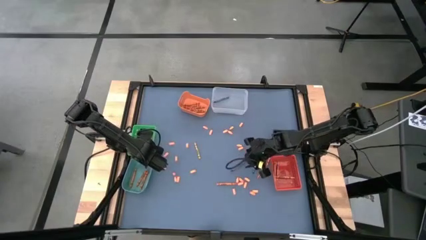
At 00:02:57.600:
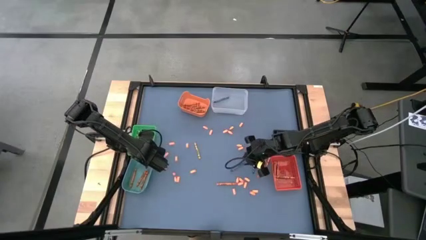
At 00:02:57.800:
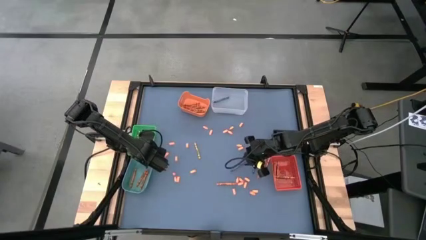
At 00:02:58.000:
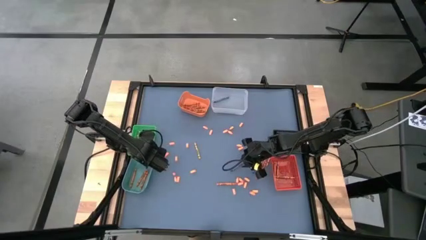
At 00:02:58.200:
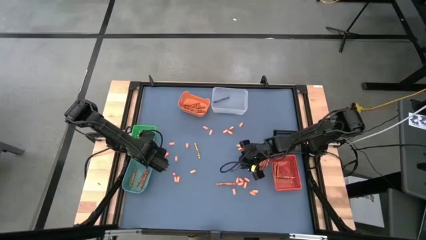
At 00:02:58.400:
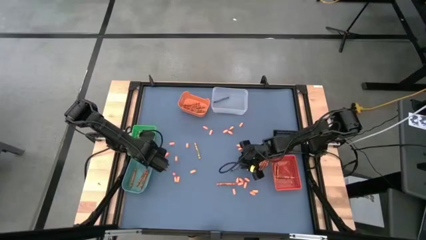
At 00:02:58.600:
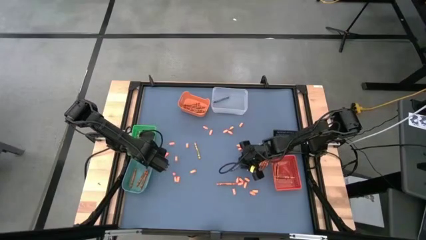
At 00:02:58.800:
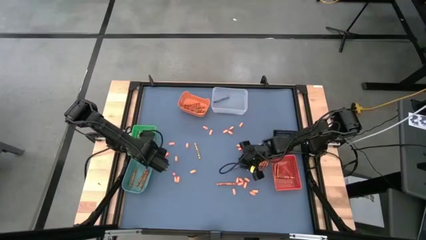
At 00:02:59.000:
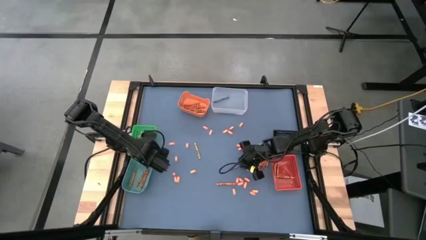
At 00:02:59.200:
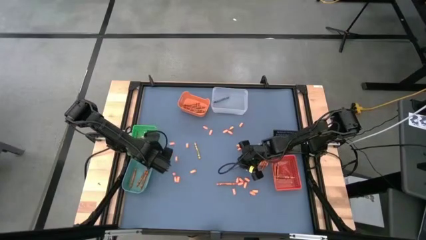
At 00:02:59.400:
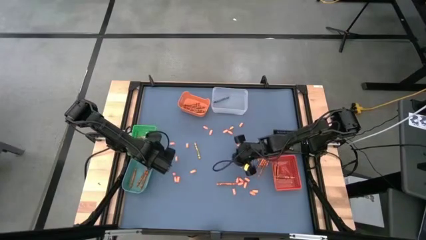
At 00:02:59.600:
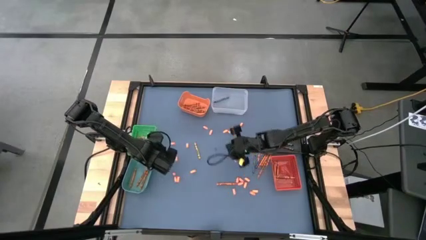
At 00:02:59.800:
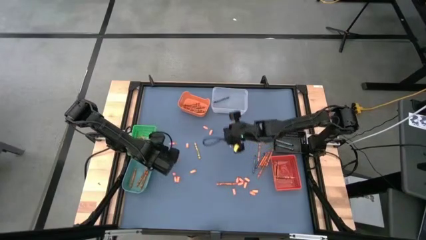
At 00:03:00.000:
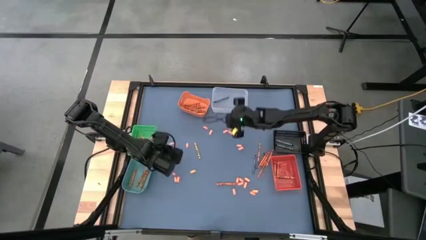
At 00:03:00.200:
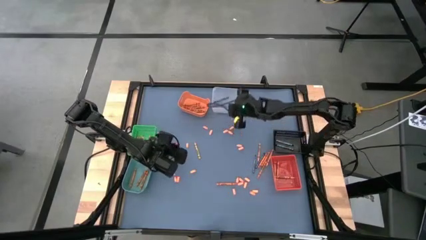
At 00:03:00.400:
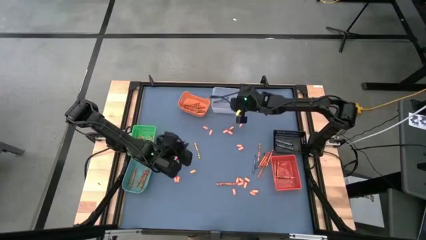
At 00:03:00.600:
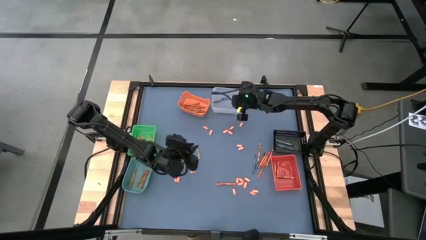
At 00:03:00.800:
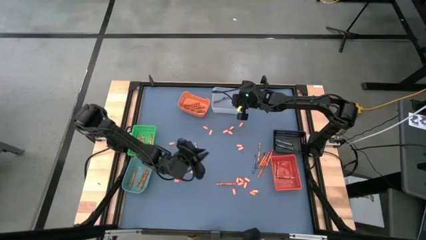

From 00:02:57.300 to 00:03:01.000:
Task: Sort crayons
Put the blue crayon into the transparent bin

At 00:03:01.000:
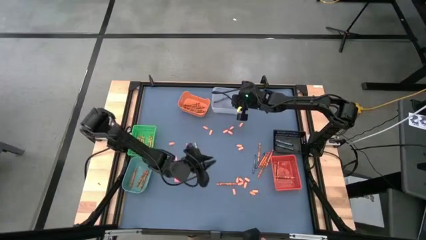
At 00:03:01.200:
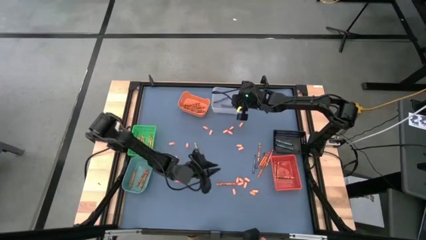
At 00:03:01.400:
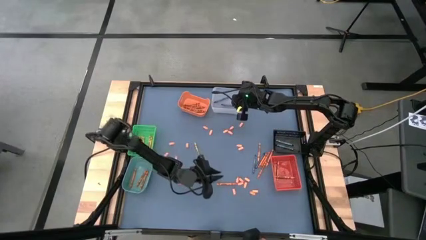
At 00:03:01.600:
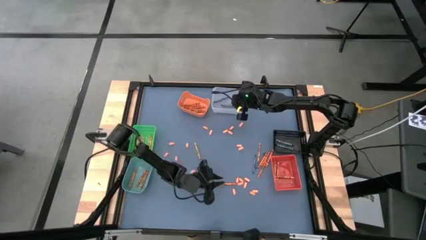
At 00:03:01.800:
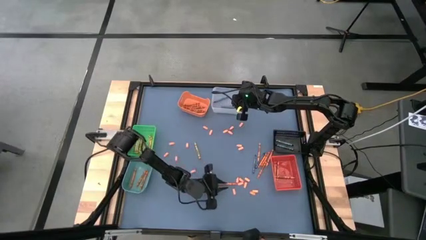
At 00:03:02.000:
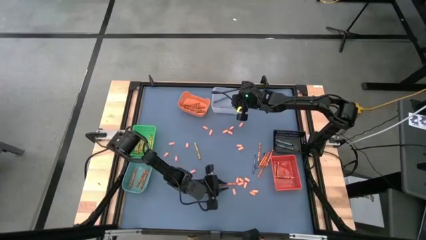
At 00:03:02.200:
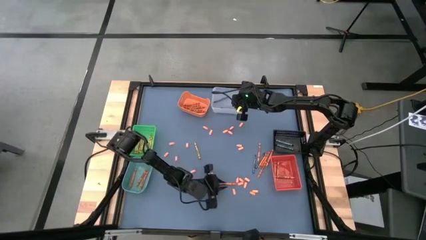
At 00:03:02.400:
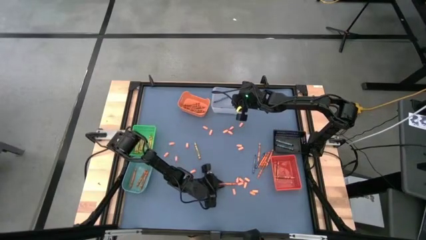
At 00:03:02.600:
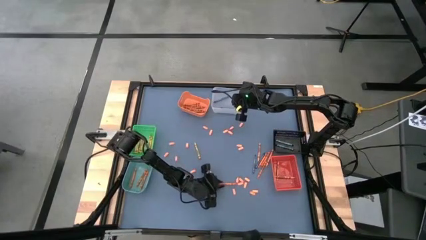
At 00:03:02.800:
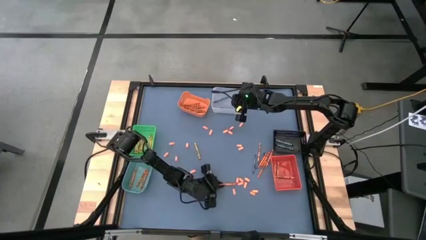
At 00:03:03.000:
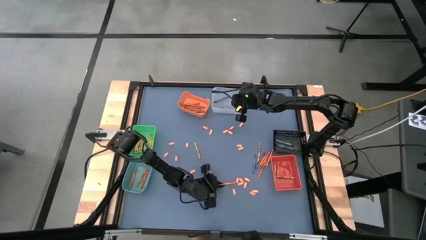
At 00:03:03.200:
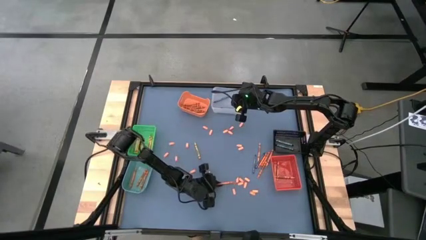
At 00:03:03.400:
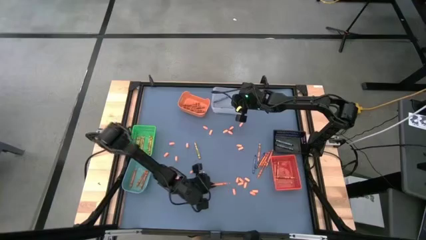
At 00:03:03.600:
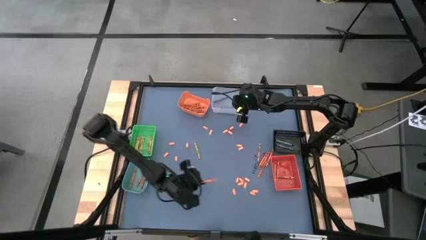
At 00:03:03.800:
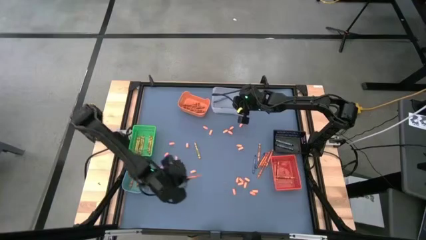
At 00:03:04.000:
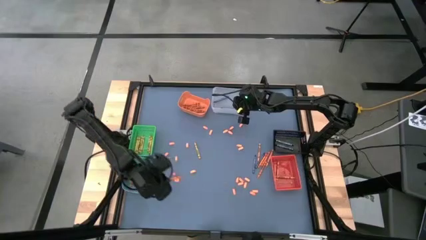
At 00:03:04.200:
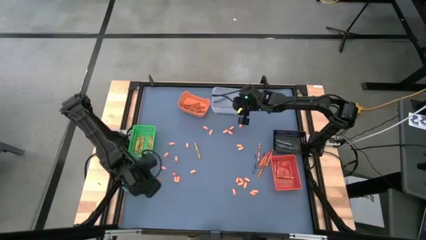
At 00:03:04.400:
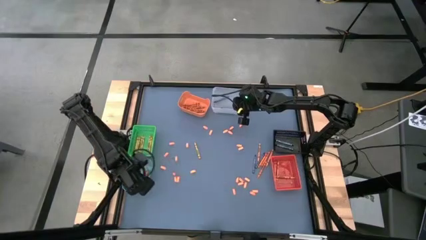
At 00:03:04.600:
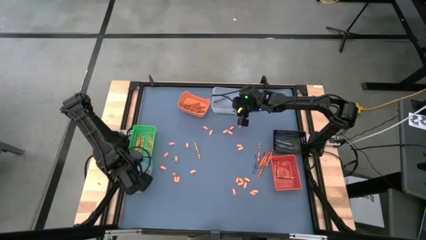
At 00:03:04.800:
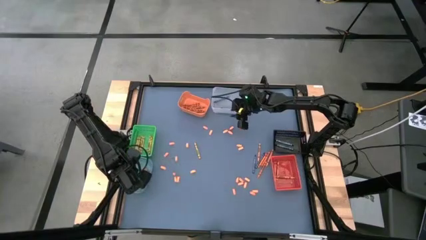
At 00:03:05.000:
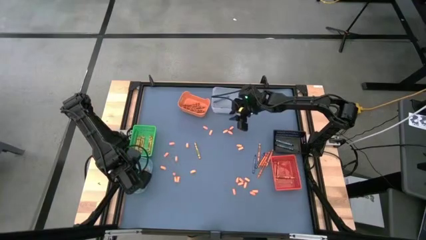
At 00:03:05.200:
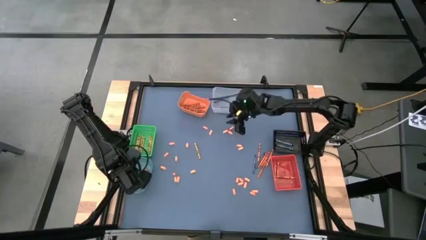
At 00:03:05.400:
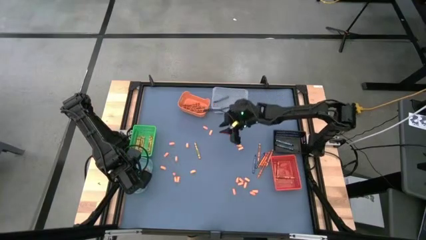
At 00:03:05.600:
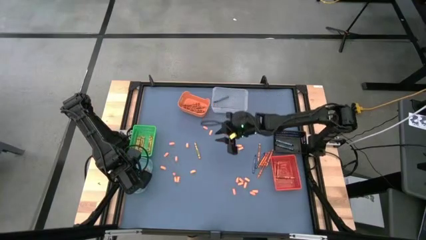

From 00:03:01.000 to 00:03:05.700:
Put the orange crayon into the blue bin

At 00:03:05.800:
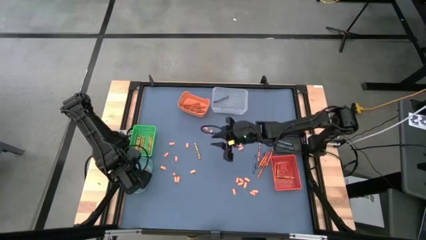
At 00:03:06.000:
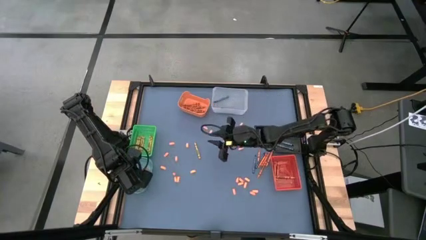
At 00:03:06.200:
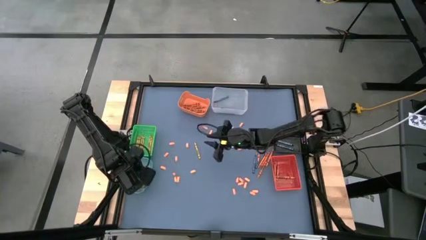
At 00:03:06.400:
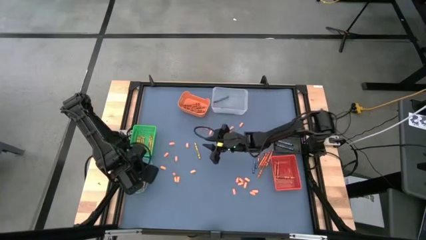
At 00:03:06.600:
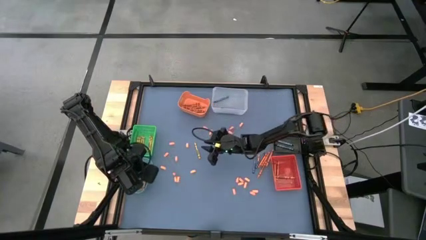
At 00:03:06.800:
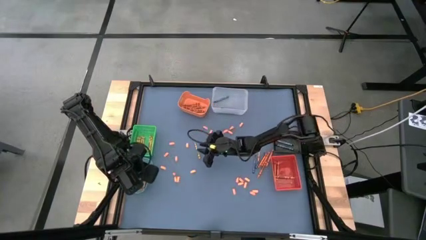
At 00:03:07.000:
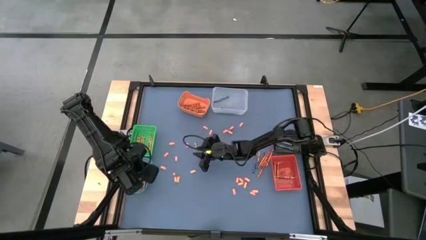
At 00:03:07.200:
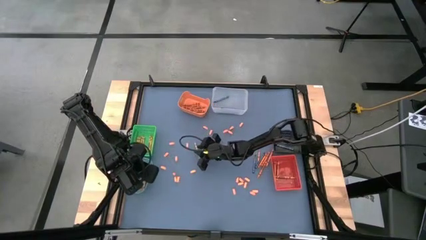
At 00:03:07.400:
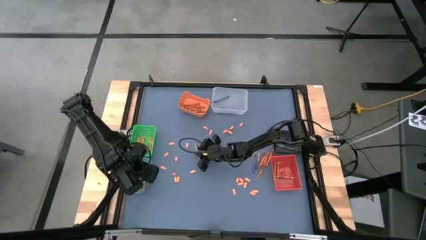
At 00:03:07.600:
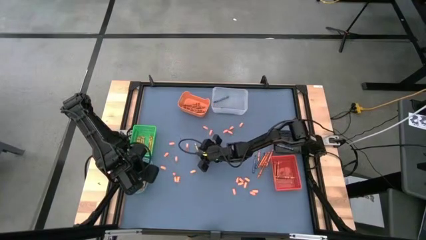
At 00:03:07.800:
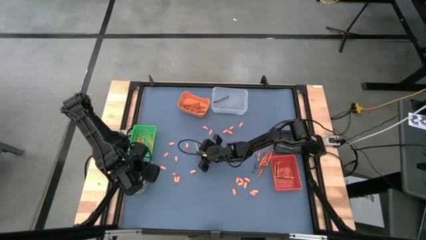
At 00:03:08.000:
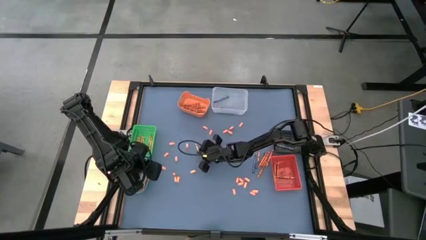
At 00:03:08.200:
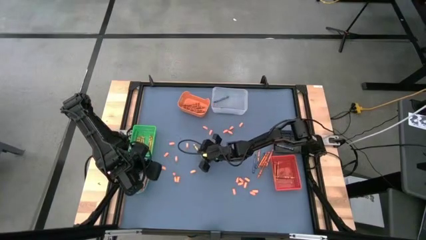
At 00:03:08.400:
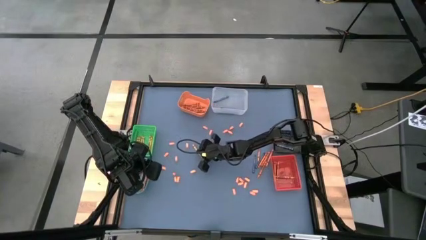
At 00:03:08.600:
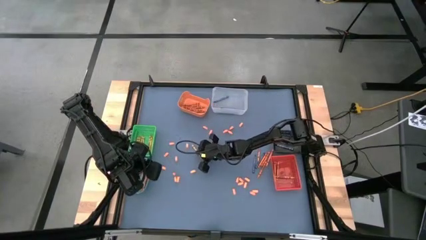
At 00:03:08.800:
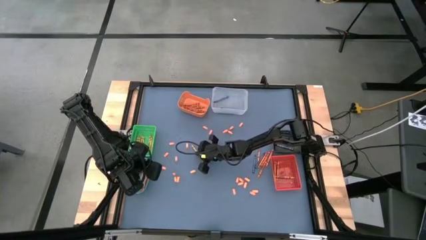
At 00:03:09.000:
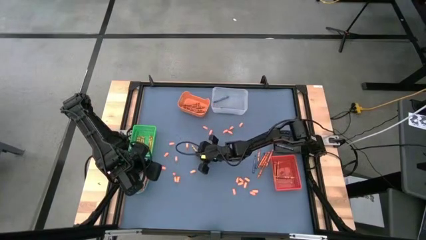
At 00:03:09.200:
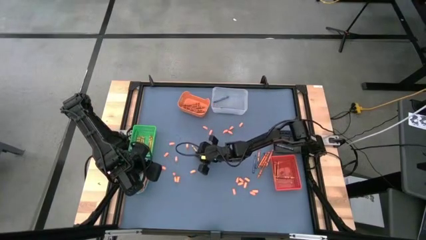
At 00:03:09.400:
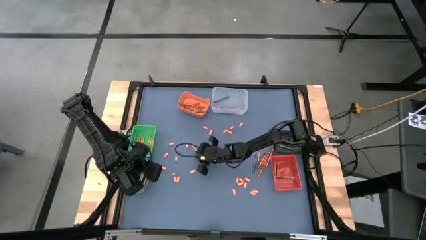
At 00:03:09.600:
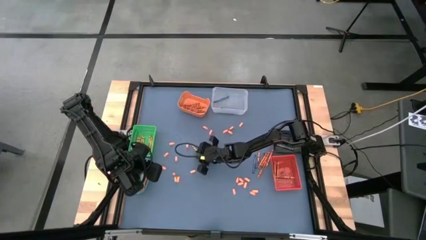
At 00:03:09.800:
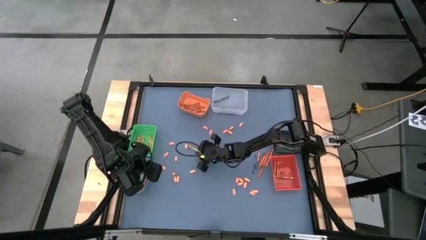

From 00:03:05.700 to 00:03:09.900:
Put the yellow crayon into the green bin

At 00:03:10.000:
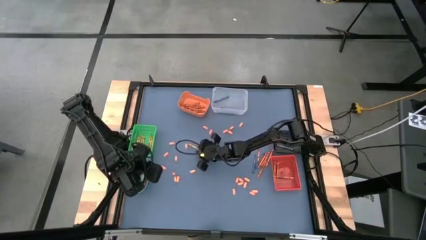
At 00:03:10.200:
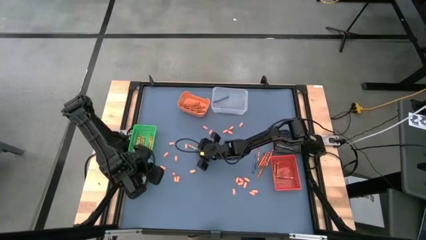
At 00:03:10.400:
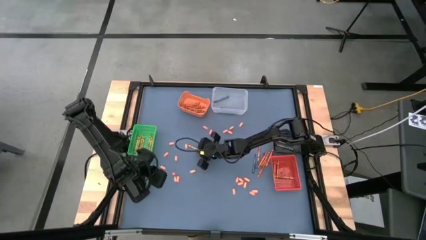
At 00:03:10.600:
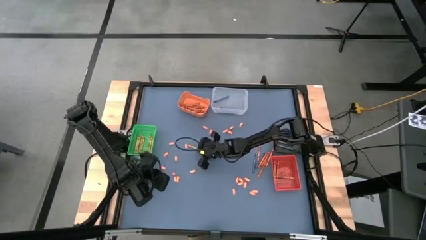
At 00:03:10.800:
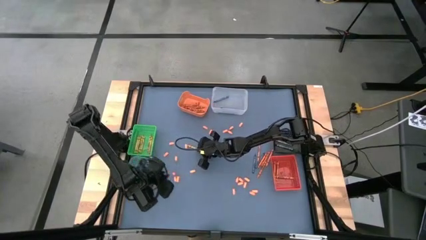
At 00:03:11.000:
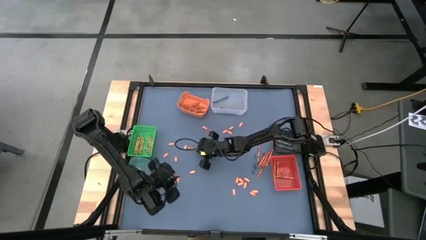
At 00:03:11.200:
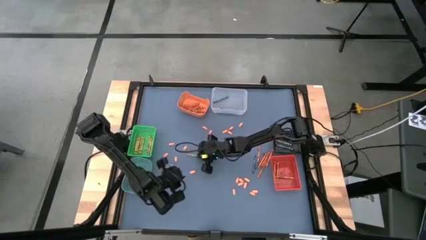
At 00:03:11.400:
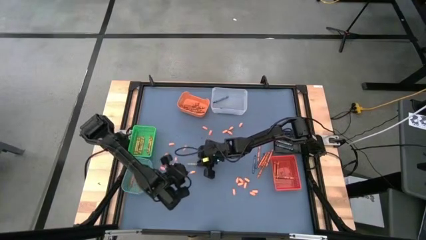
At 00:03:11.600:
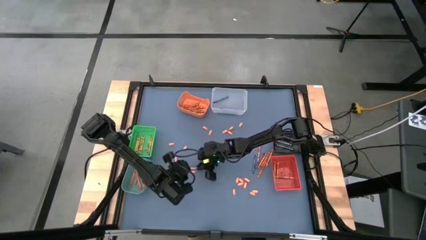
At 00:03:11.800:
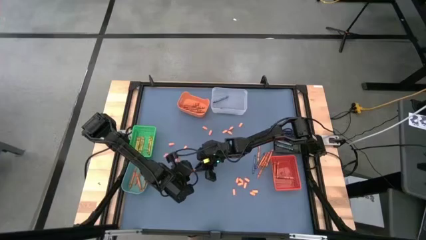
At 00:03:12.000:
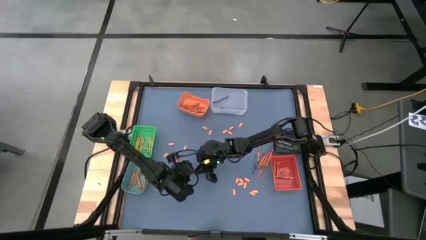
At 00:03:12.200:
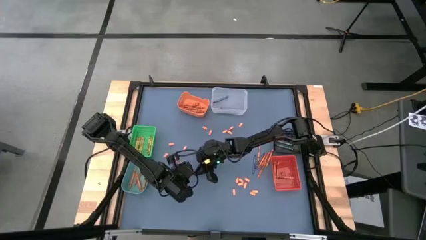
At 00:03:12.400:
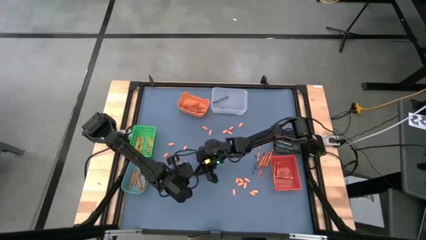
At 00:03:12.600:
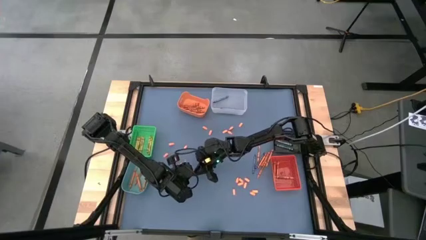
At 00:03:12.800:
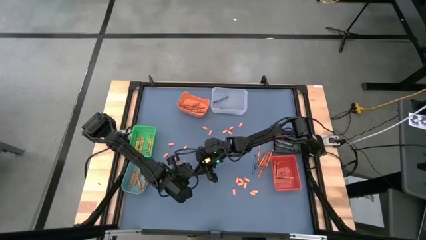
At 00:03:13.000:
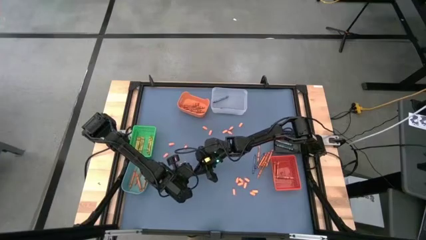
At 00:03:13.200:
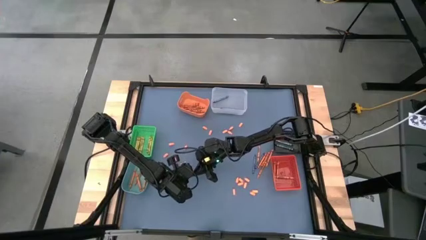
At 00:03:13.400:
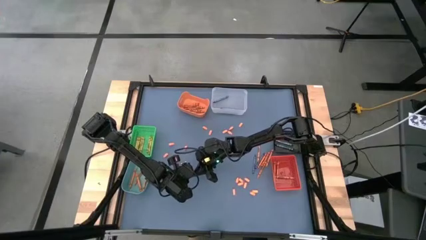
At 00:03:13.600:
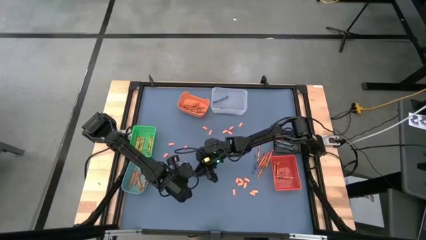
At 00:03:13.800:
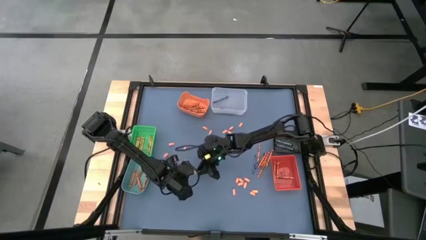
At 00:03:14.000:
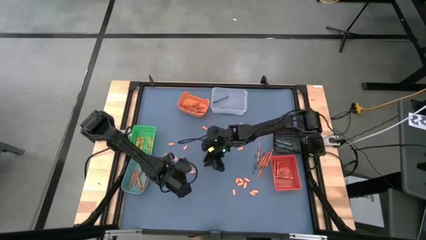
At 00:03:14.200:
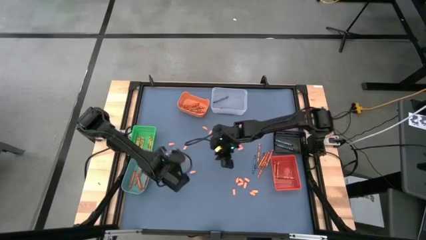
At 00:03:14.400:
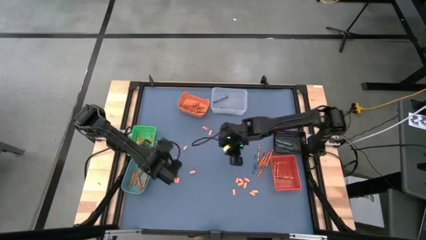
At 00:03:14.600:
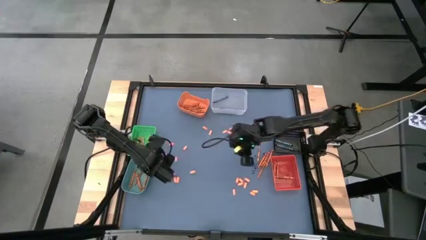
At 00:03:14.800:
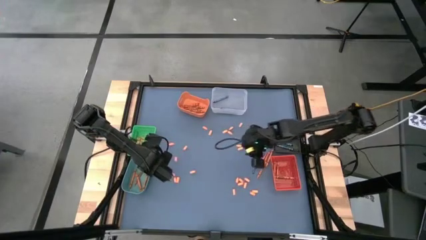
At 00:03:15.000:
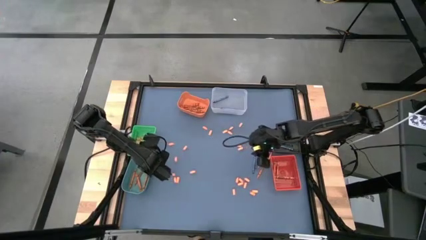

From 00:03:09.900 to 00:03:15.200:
Put the yellow crayon into the green bin
